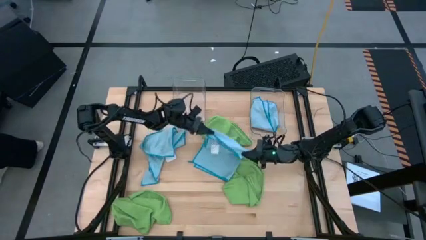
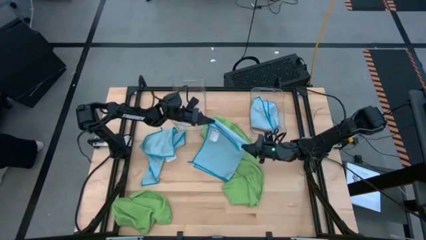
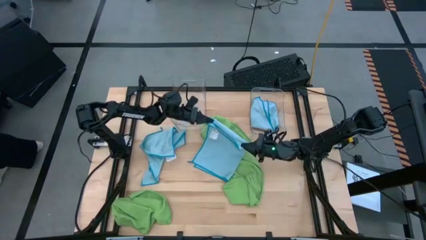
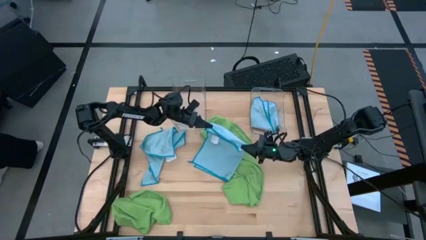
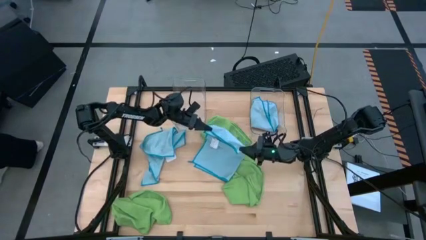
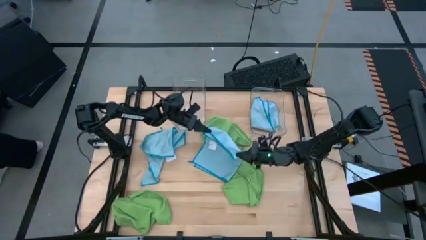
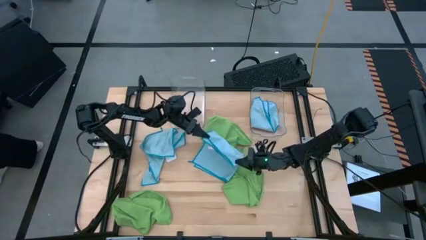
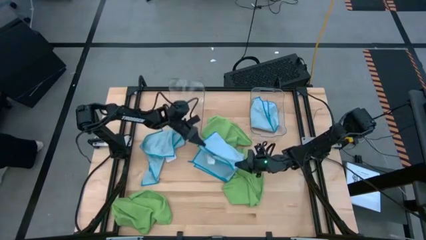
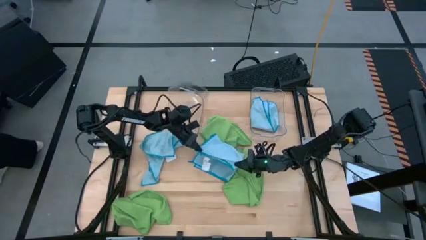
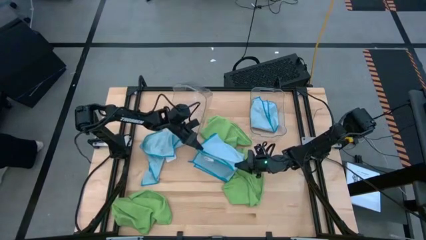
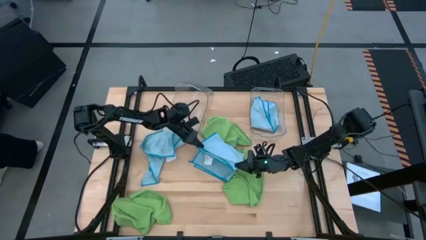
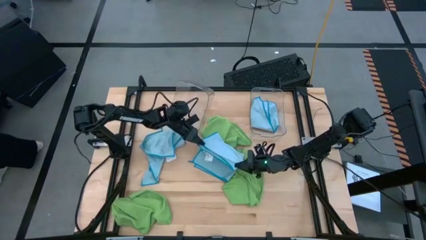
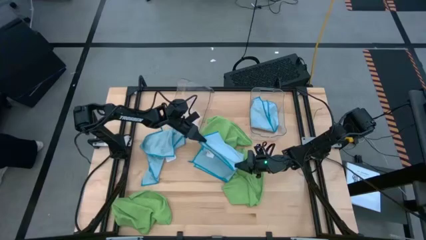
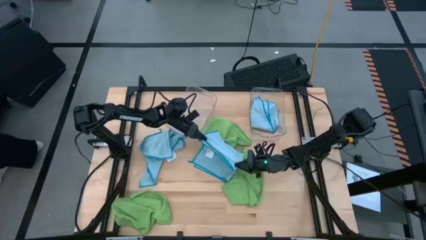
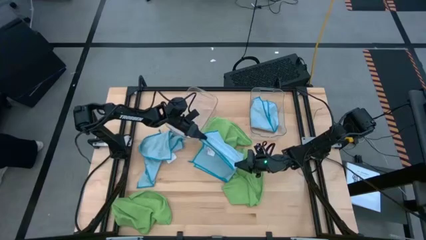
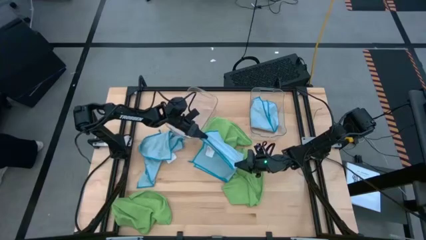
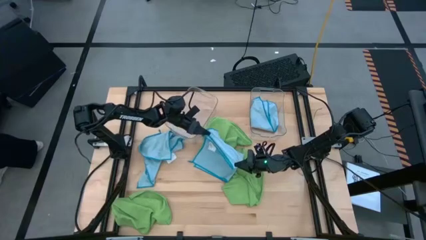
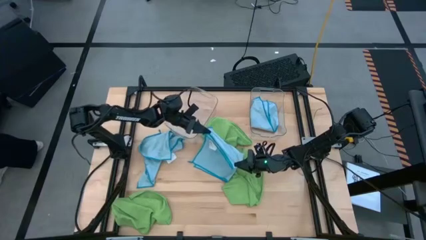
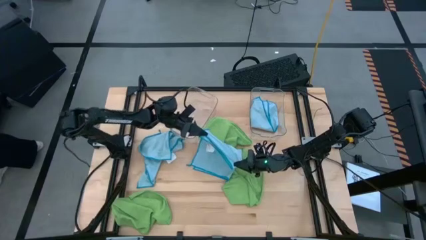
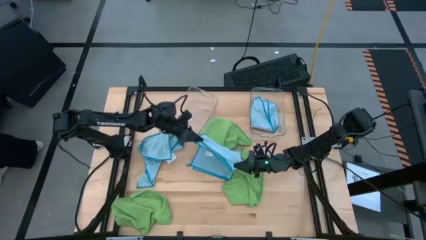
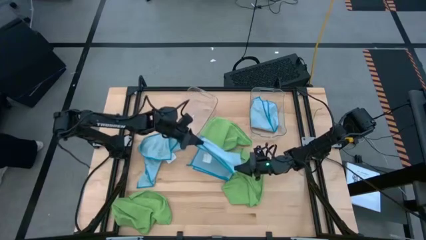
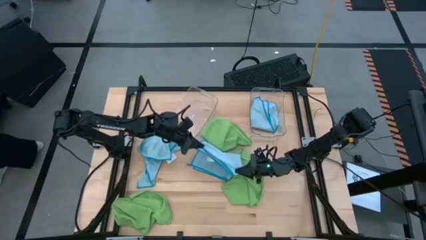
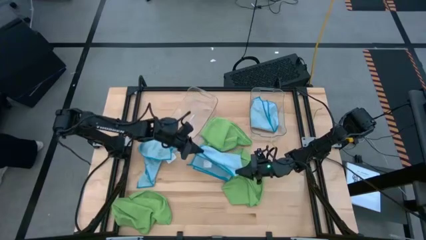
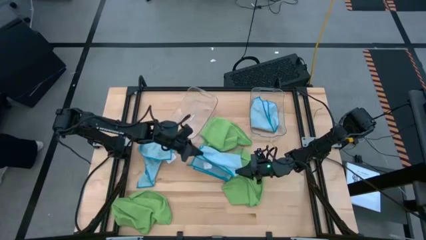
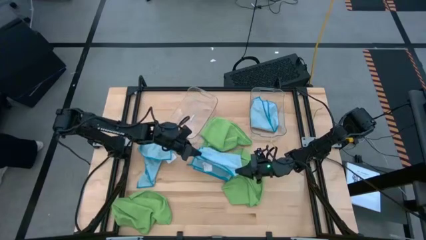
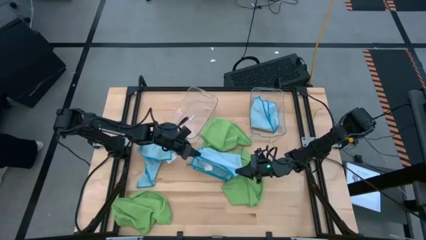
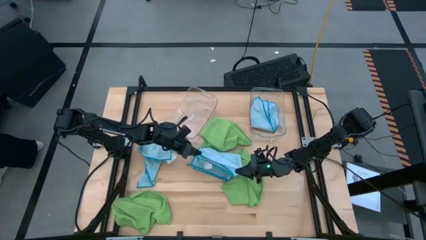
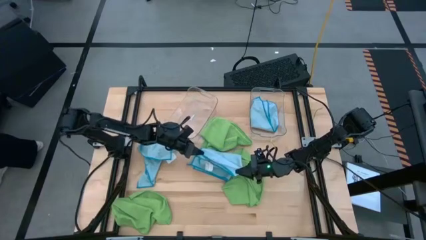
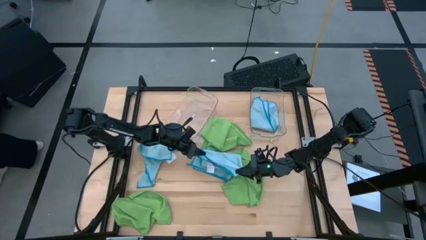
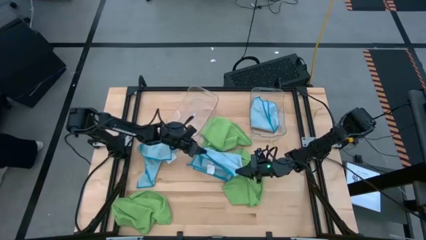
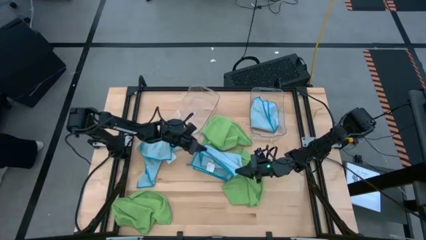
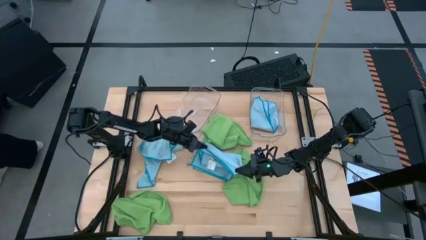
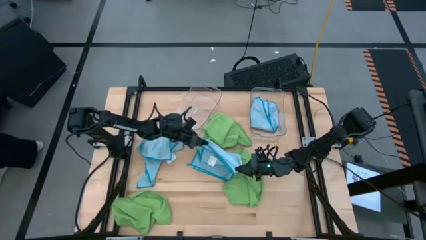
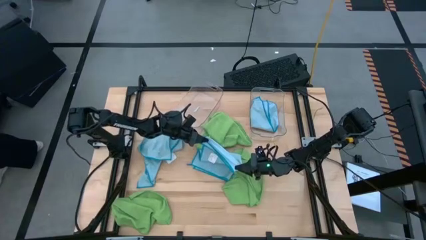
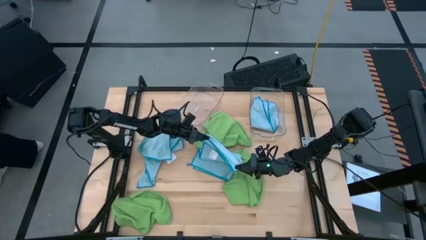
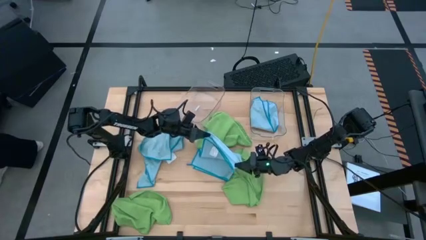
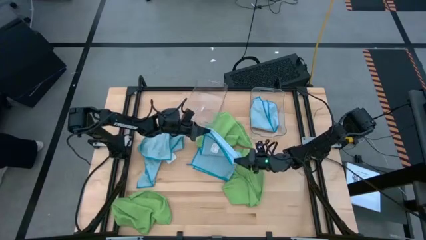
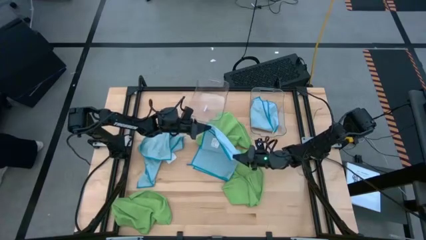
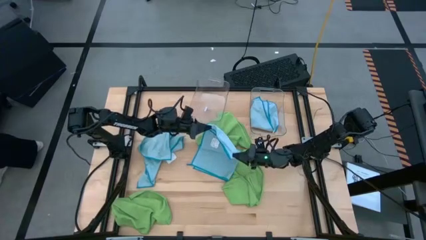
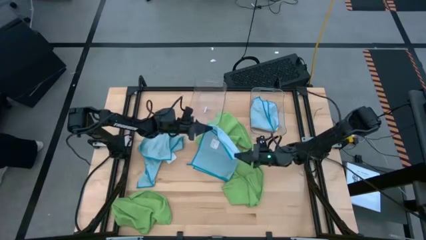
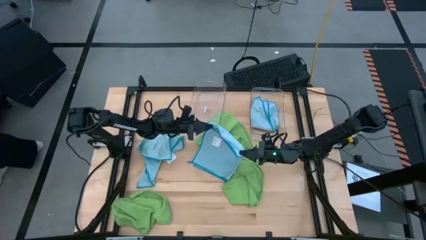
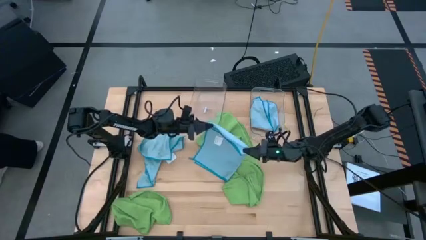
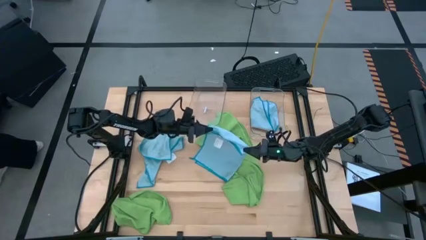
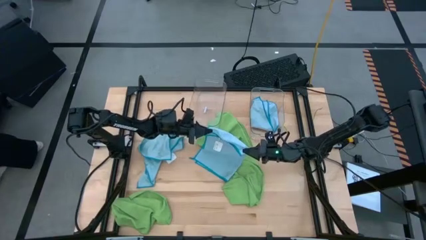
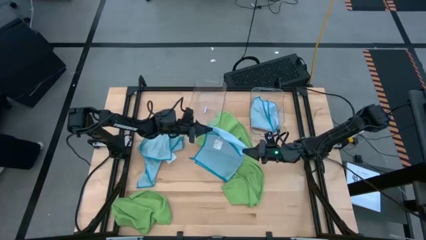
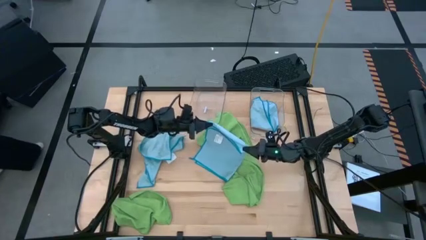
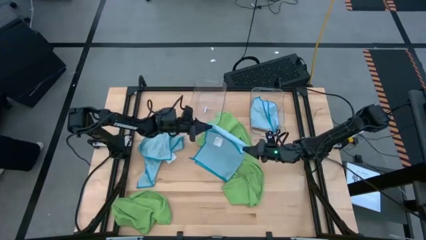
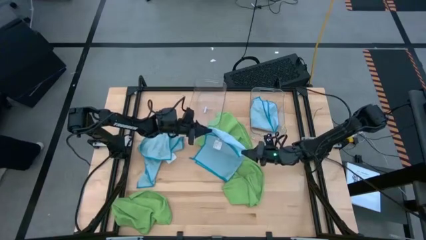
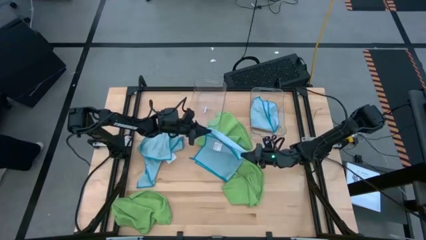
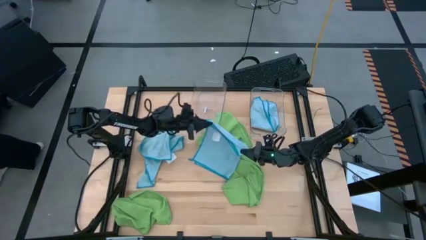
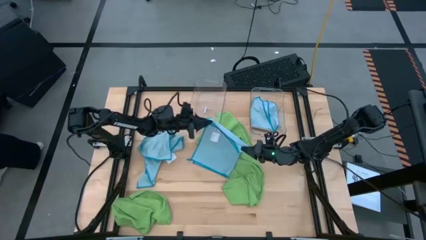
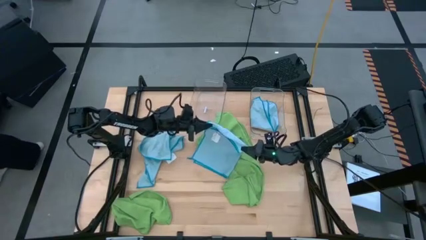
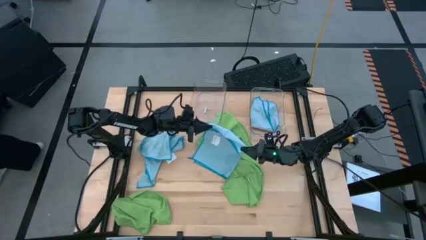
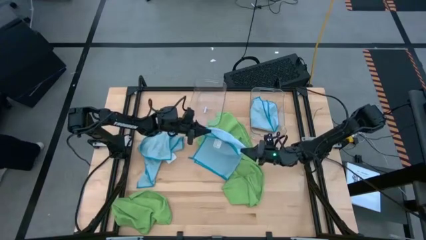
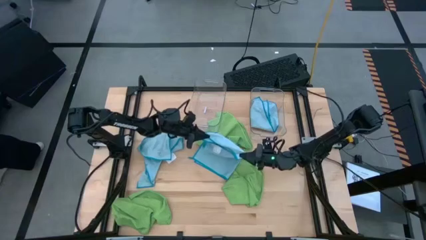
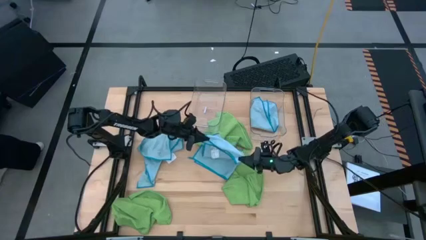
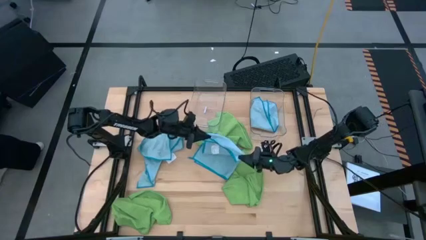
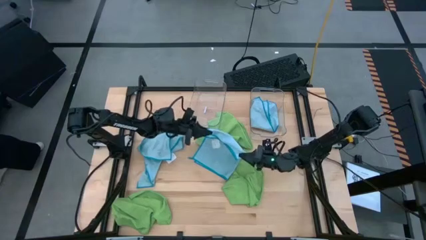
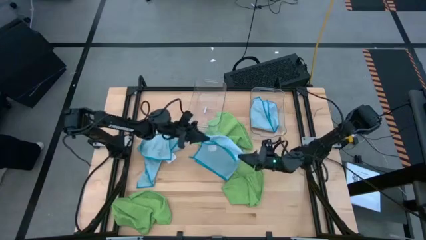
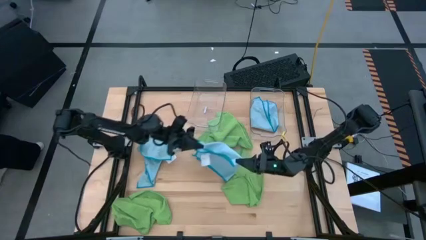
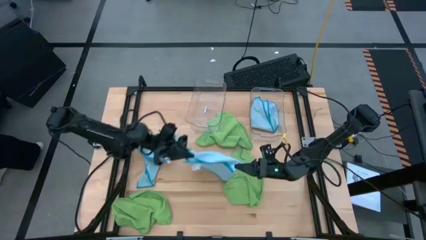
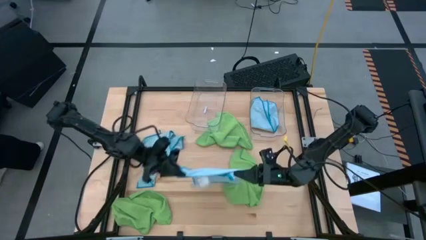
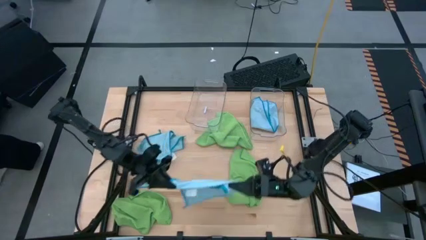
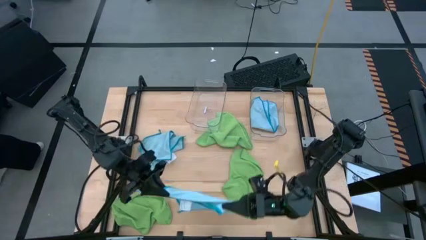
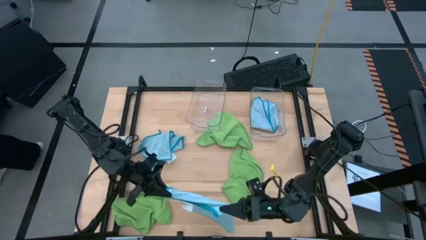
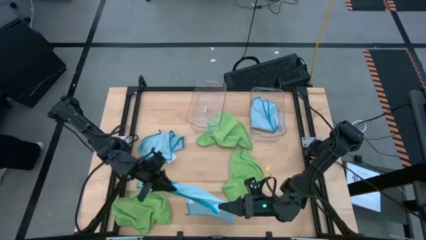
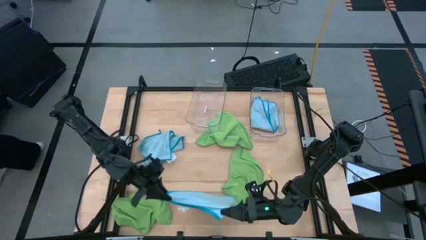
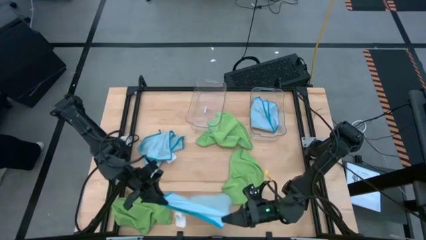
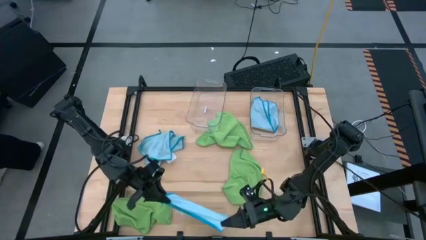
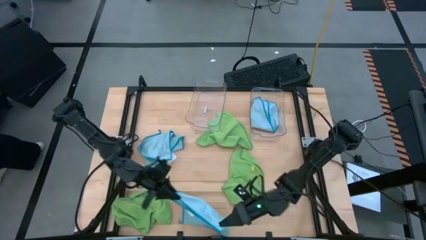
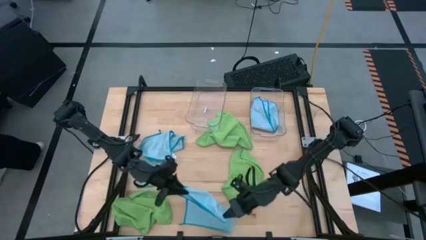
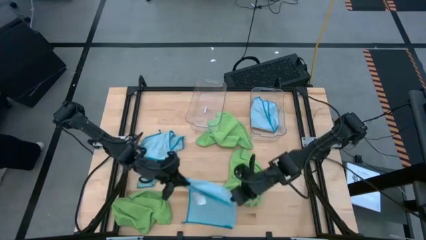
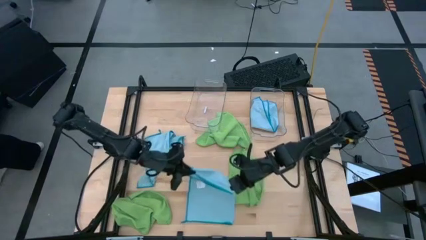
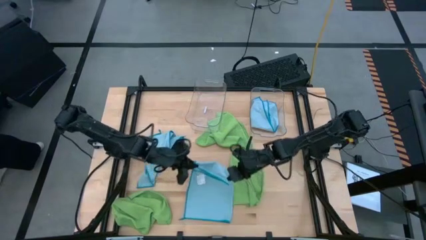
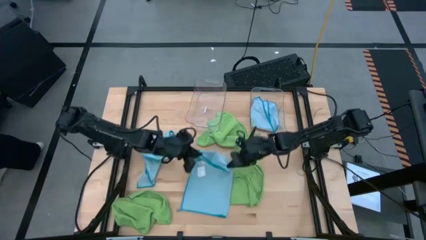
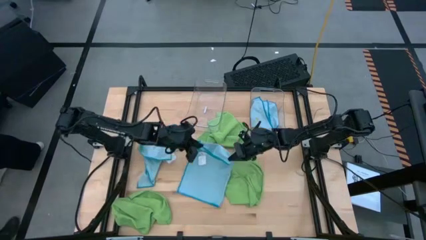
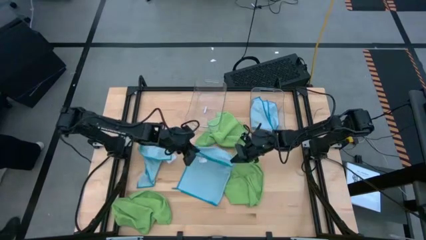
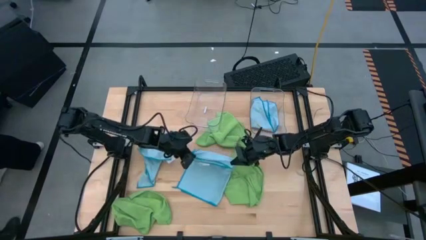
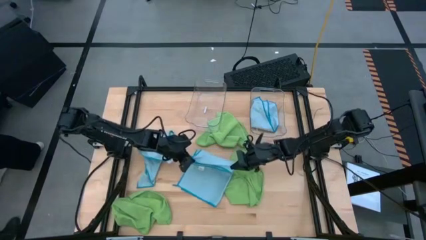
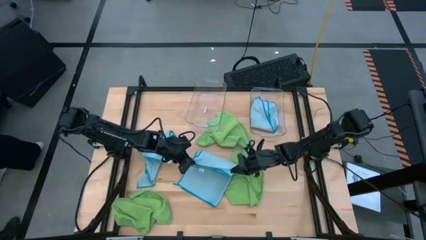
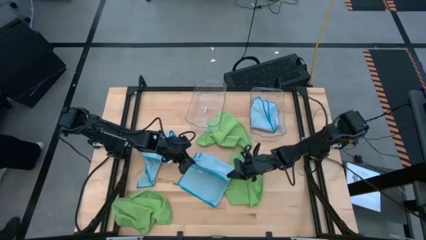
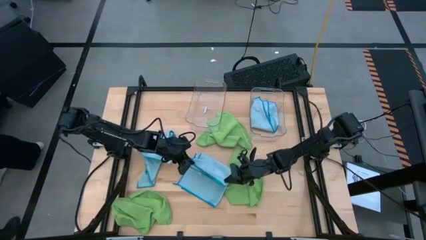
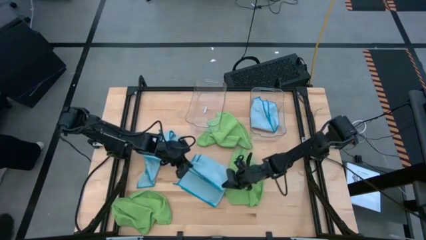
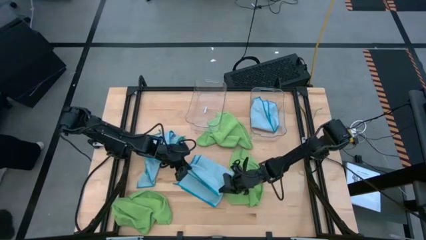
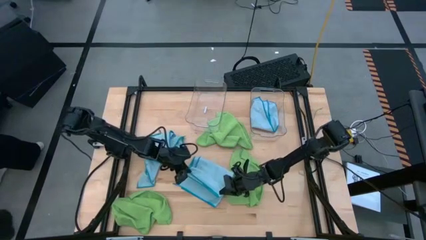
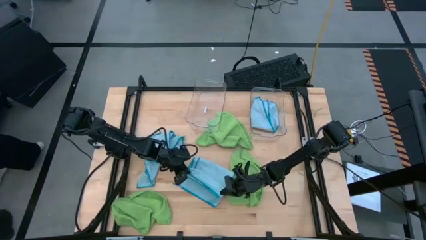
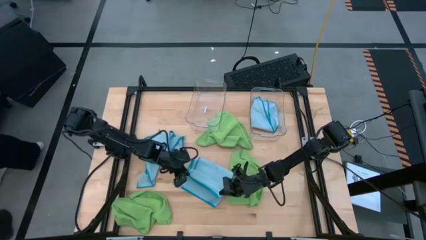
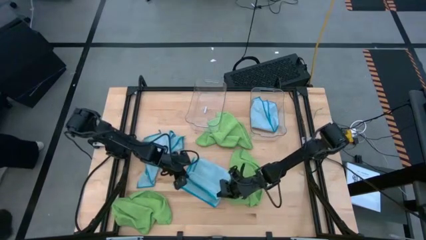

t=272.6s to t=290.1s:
Task: Fold microfiber towels
Fold the right blue microfiber towel
